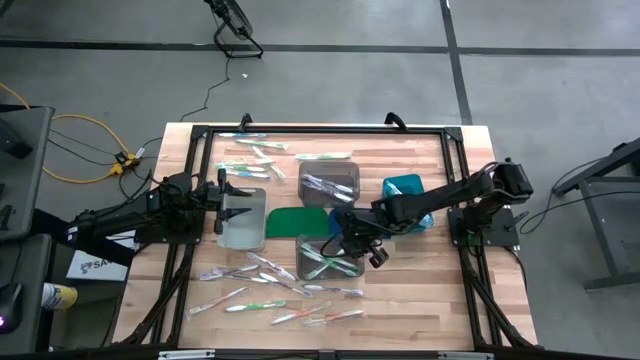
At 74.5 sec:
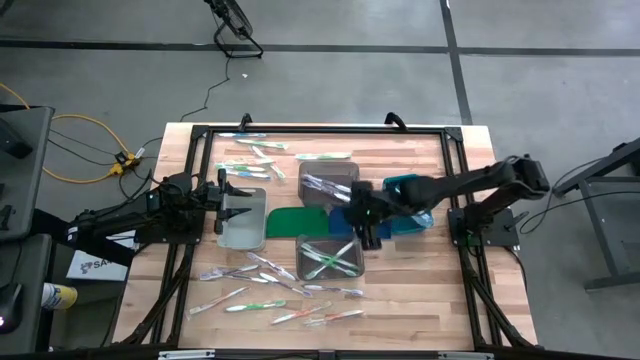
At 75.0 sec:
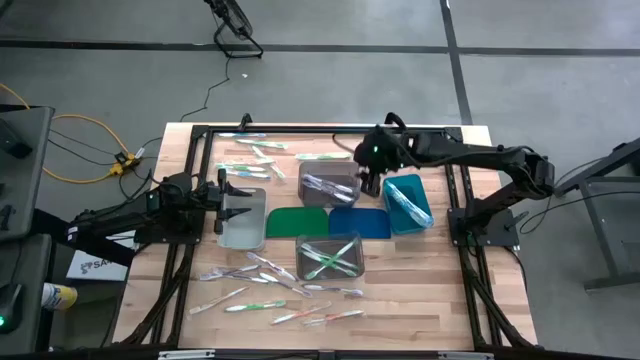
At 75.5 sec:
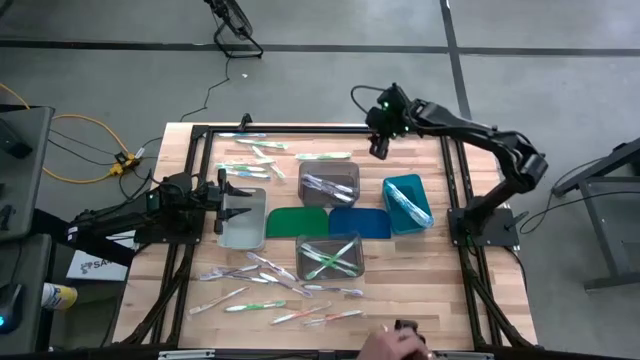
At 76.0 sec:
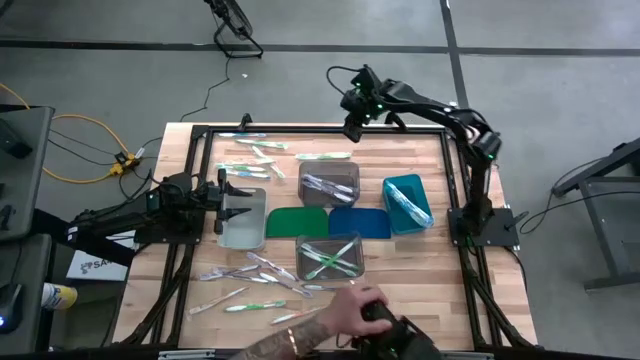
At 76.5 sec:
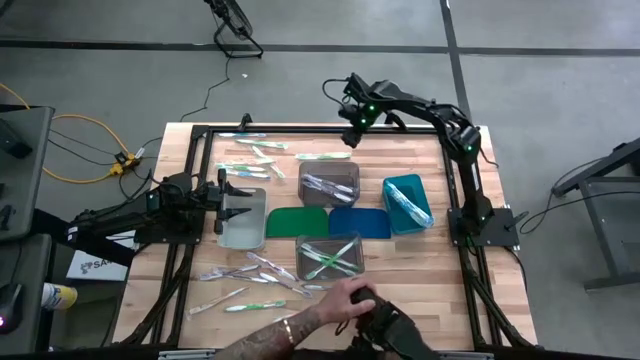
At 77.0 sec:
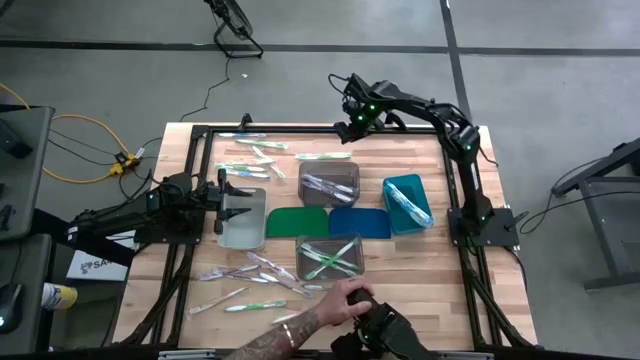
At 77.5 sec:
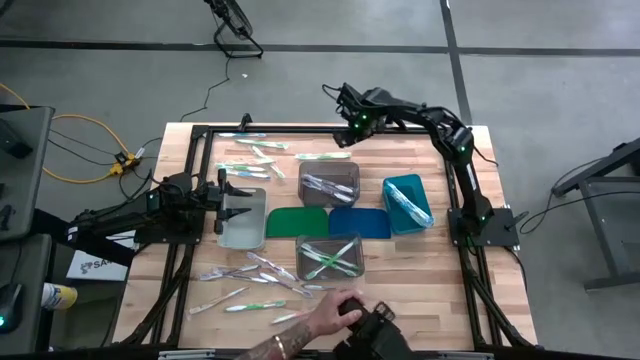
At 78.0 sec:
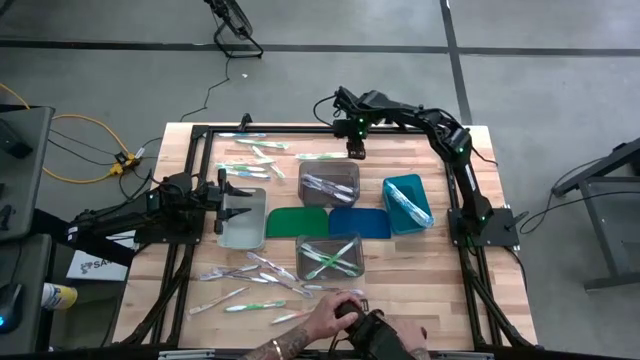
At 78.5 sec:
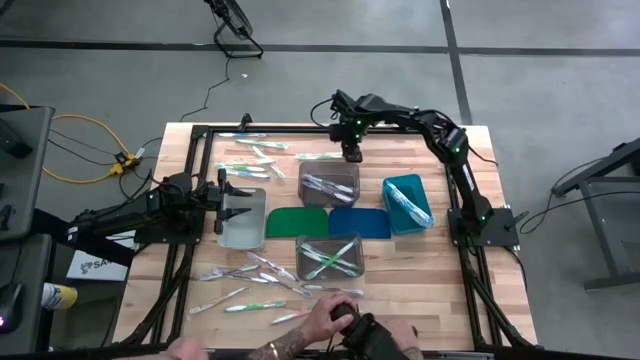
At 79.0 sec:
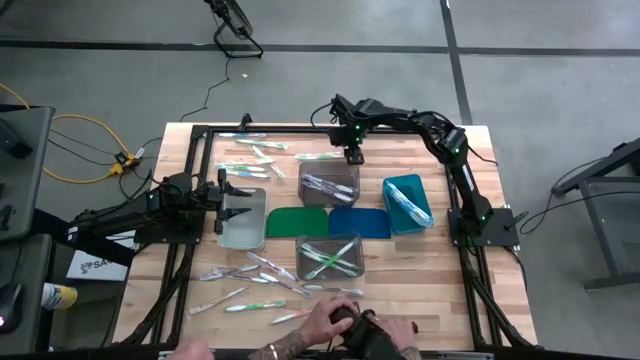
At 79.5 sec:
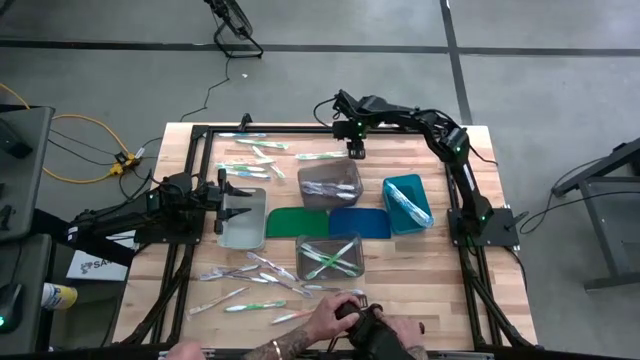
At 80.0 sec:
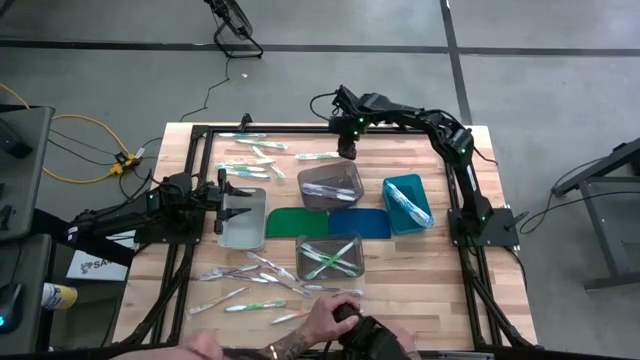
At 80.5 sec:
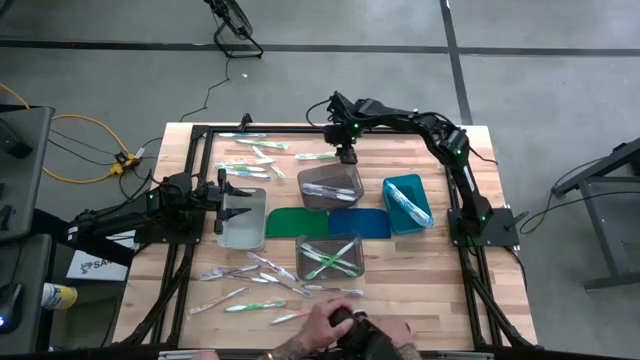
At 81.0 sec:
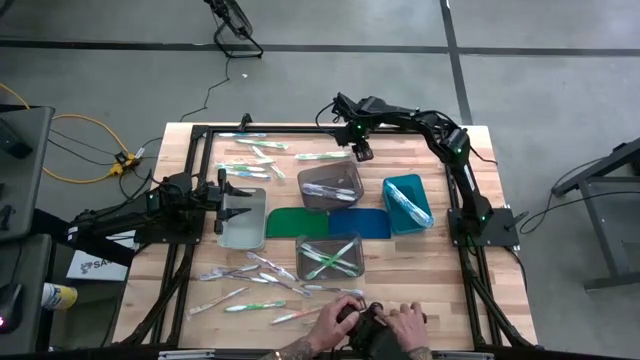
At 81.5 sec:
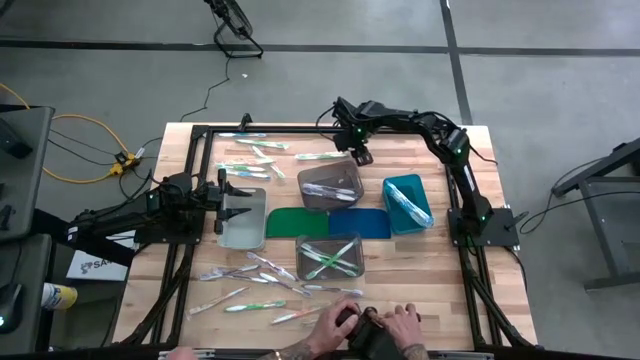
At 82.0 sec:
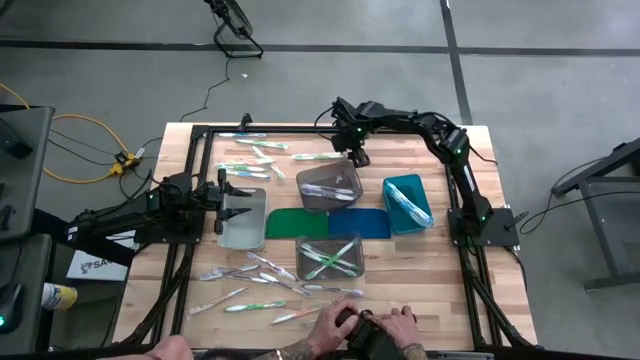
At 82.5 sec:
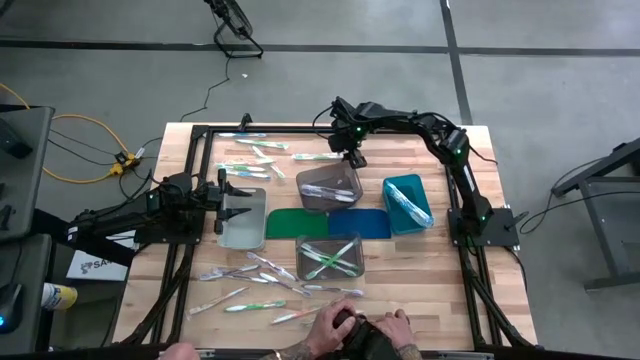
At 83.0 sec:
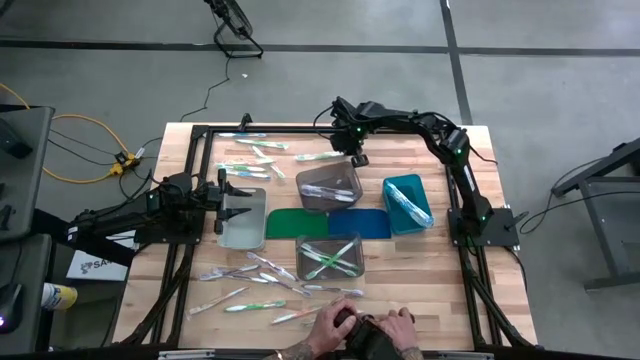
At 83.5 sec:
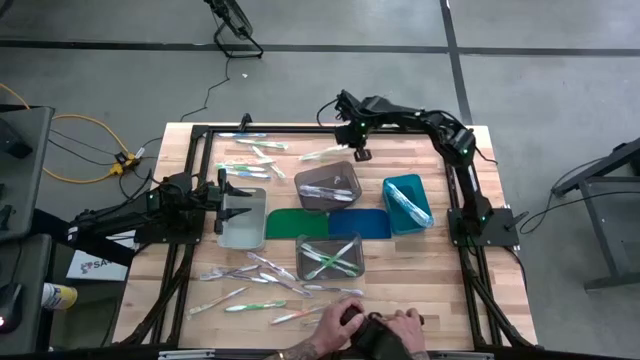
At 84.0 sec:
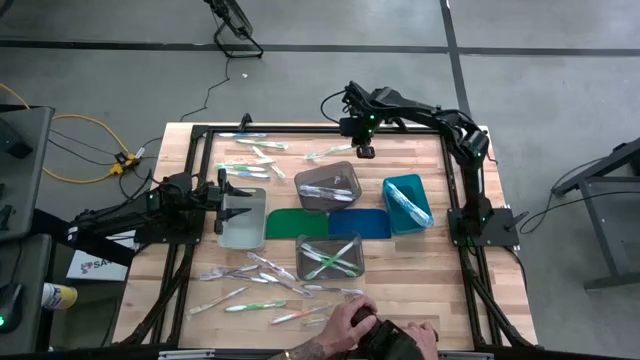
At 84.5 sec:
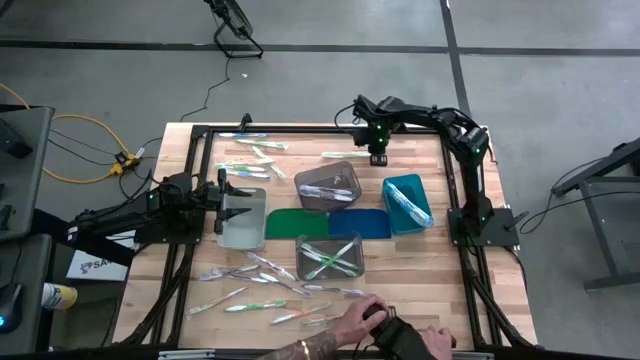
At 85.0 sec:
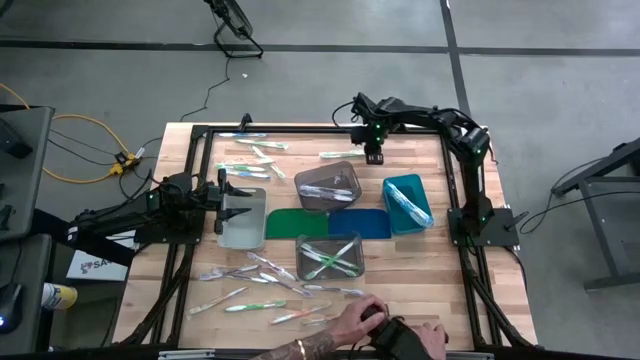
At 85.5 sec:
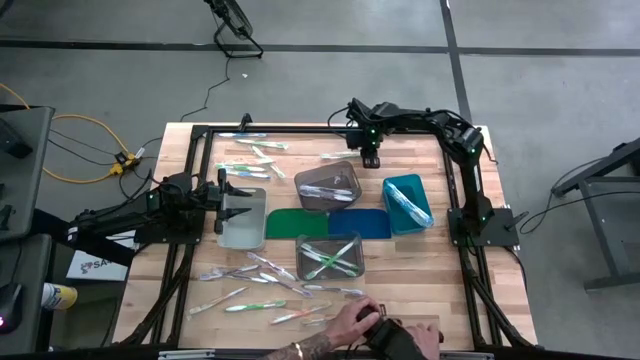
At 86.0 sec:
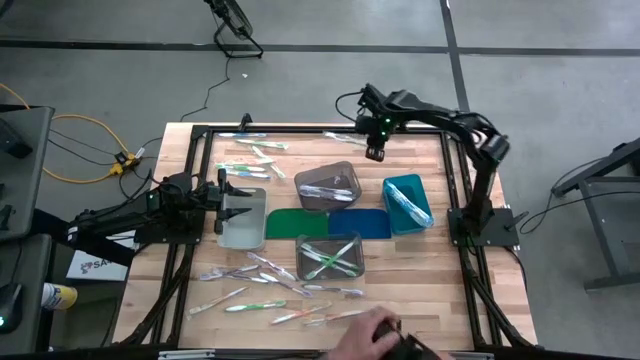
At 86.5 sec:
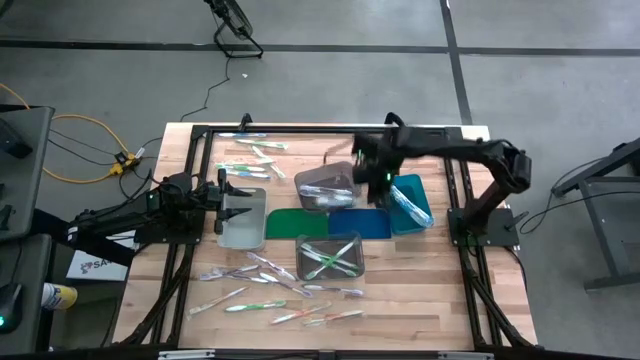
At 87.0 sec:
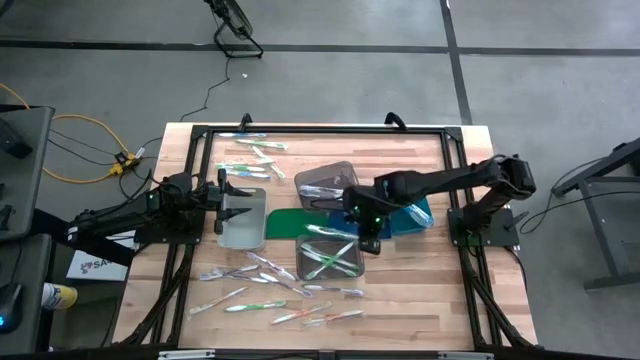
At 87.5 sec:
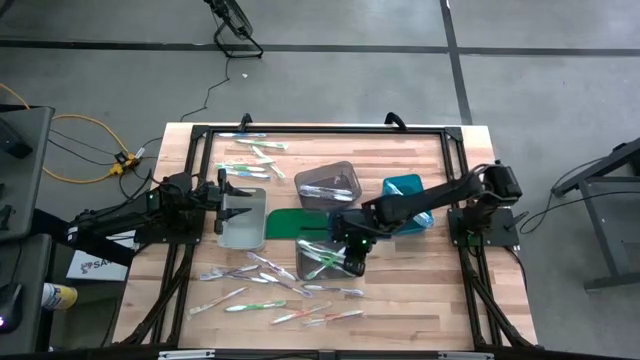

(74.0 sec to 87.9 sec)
Task: Pick & Place Toothbrushes
Put the green toothbrush into the bottom black bin

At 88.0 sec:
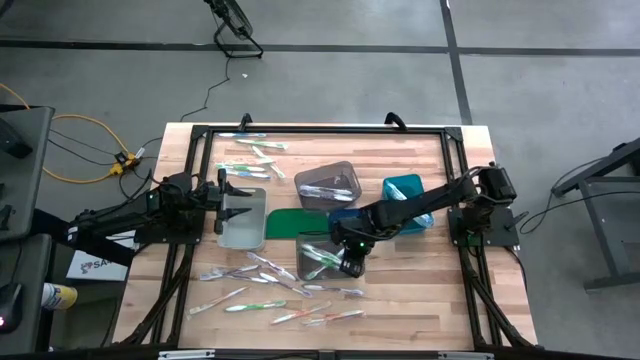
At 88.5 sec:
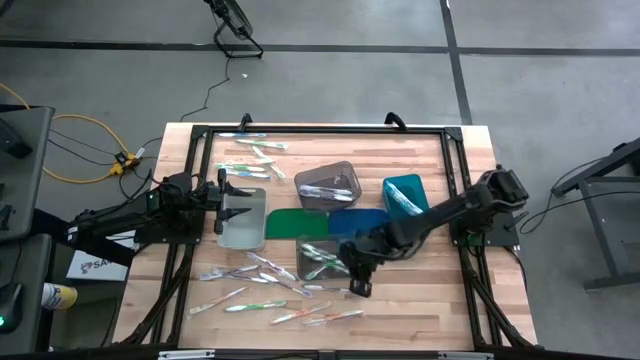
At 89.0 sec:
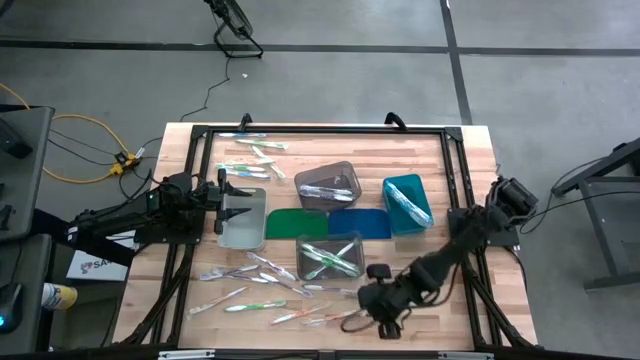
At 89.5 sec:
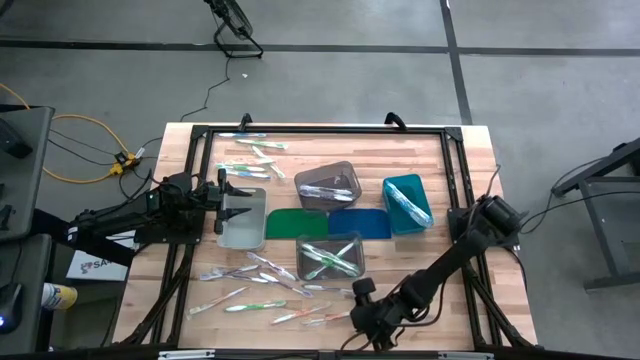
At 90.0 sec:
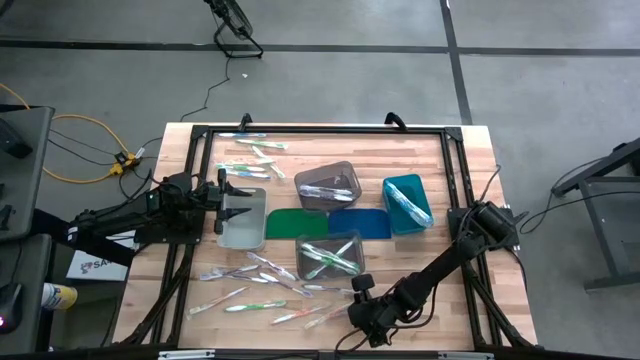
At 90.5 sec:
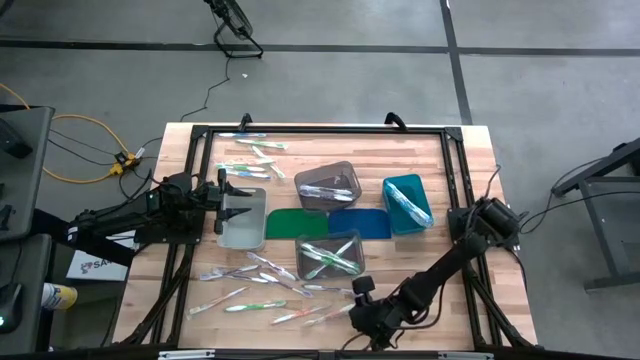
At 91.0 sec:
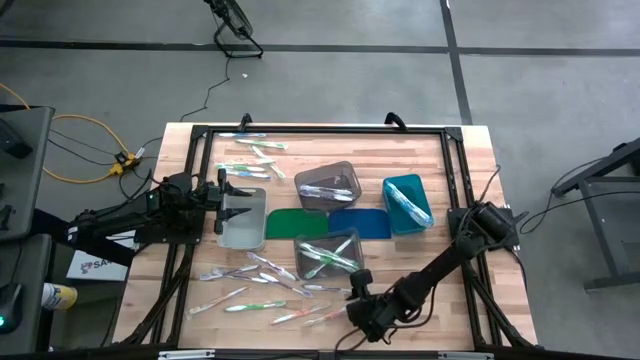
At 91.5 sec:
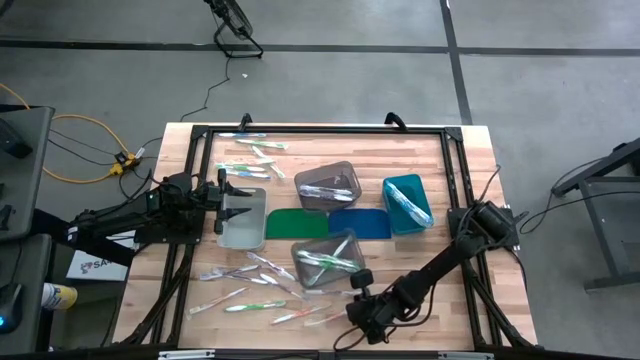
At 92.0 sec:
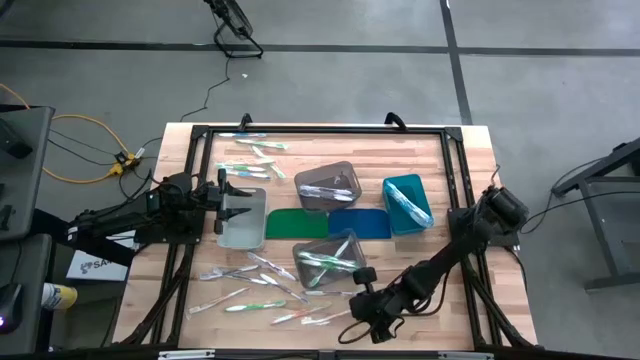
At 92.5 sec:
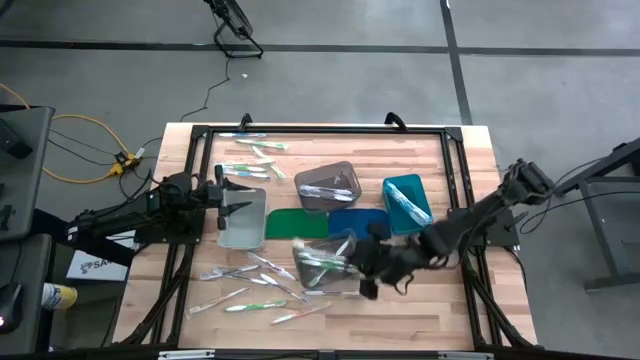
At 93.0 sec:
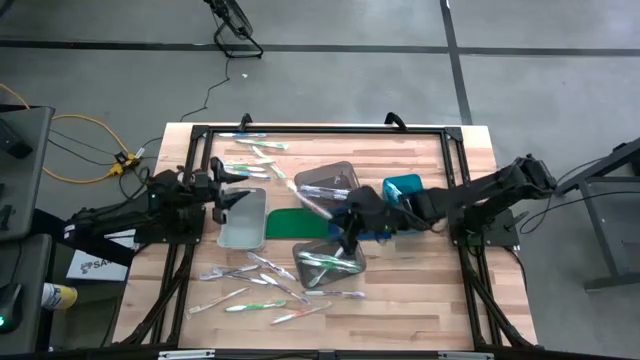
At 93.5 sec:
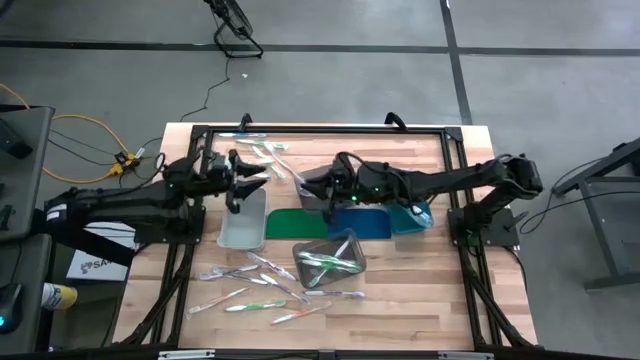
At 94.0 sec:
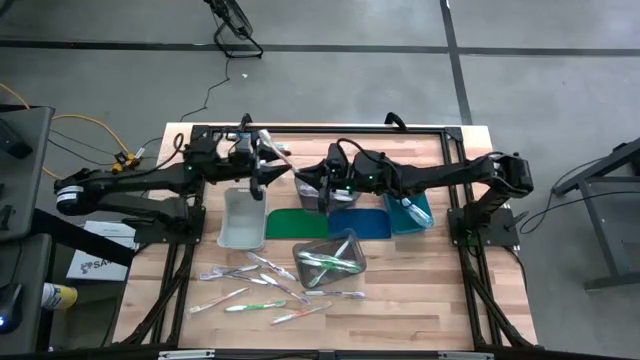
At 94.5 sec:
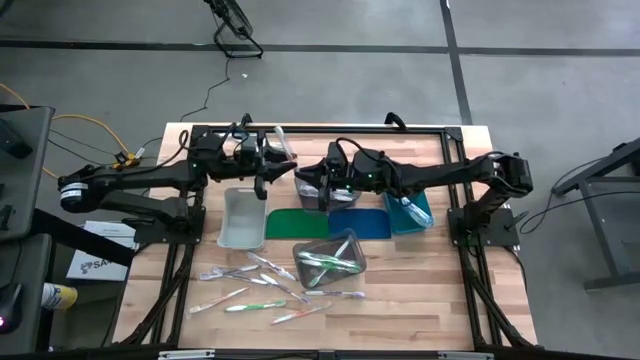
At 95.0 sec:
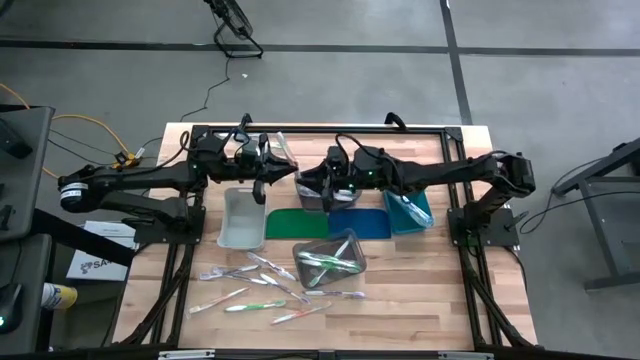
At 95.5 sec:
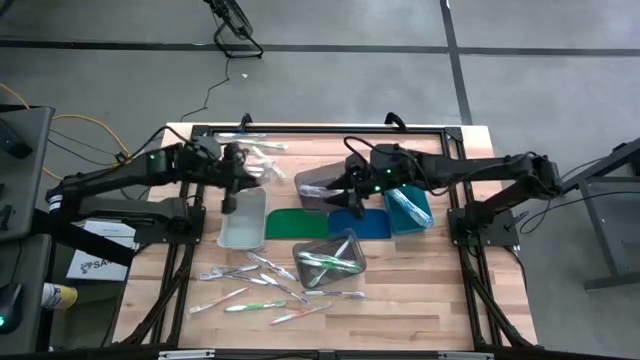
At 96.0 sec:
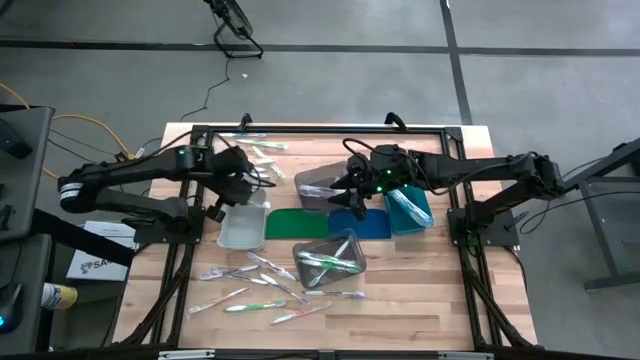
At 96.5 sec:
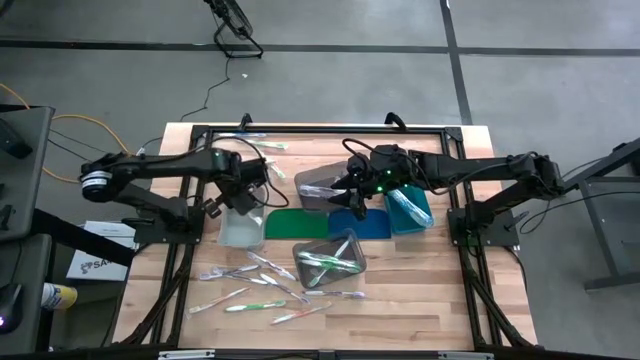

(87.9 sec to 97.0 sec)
Put the orange toothbrush into the gray bin
